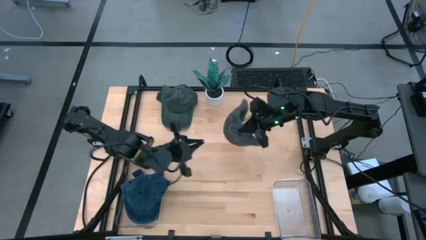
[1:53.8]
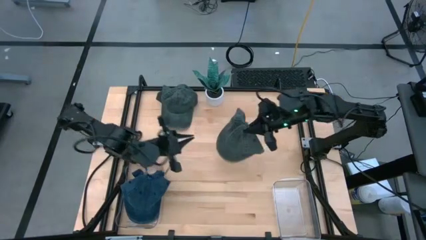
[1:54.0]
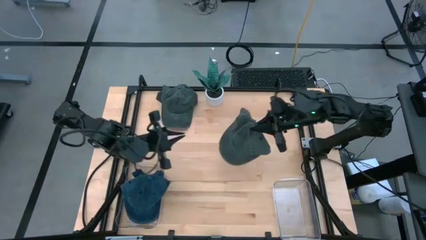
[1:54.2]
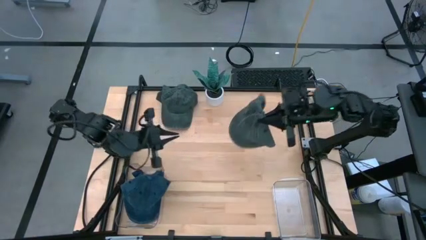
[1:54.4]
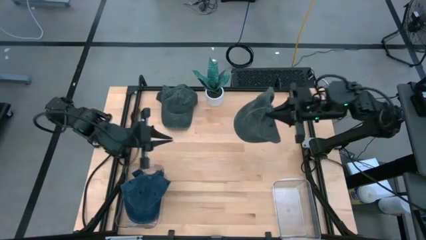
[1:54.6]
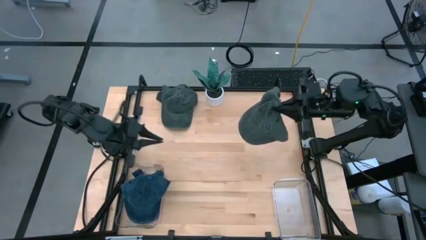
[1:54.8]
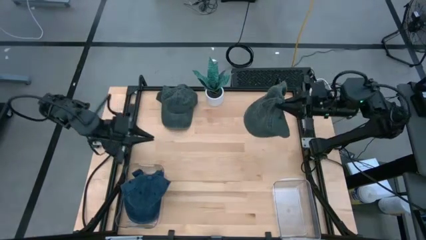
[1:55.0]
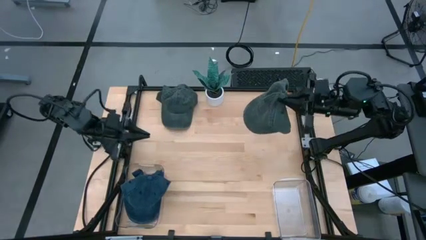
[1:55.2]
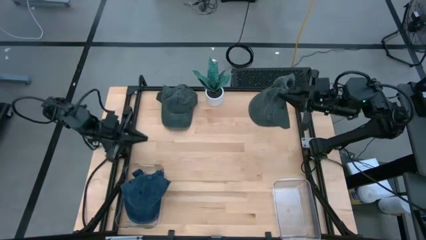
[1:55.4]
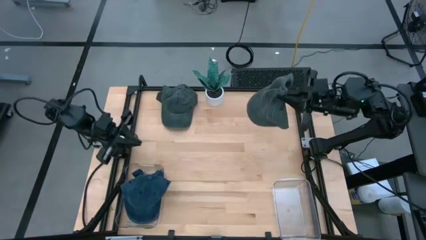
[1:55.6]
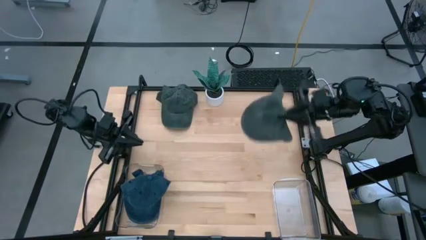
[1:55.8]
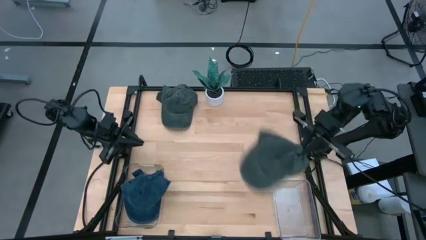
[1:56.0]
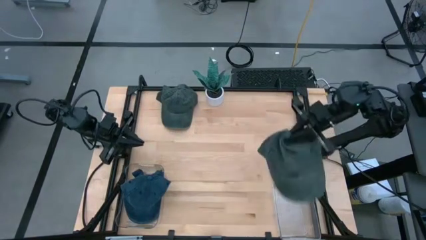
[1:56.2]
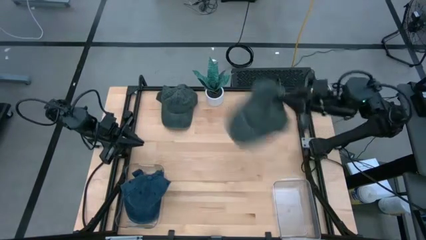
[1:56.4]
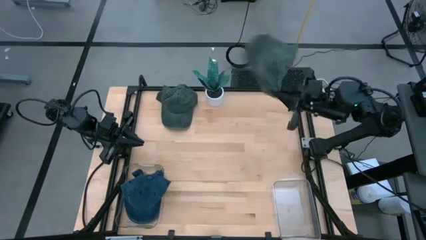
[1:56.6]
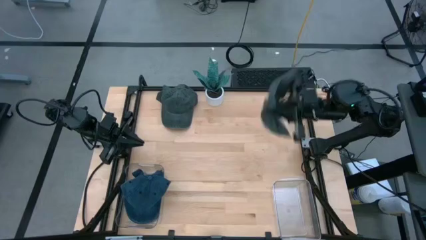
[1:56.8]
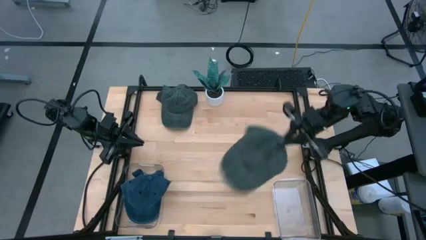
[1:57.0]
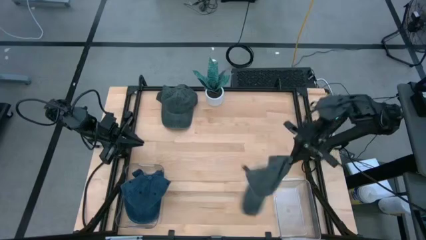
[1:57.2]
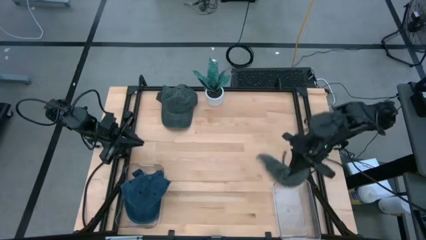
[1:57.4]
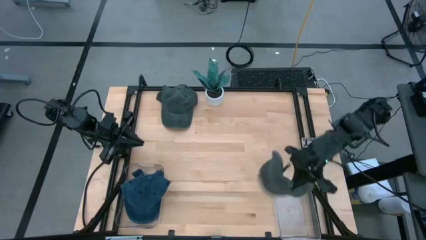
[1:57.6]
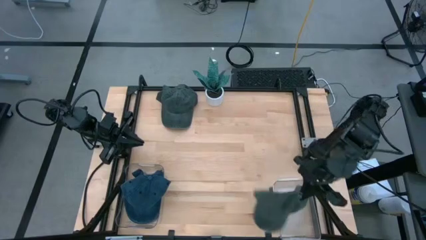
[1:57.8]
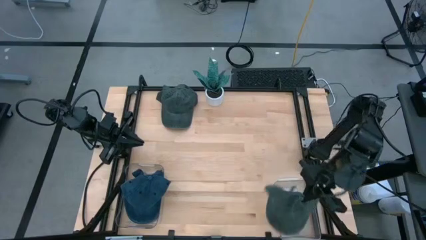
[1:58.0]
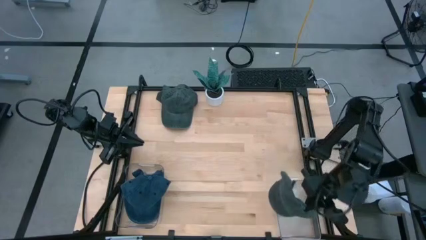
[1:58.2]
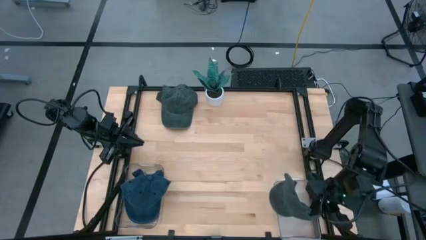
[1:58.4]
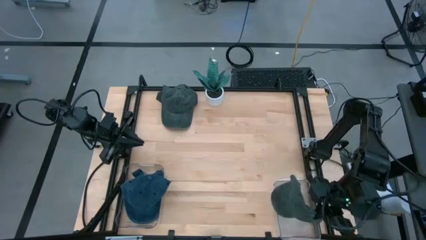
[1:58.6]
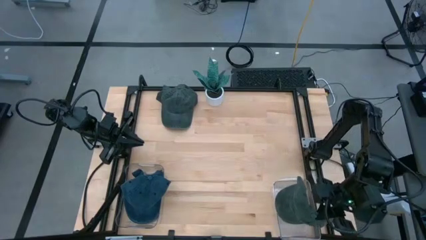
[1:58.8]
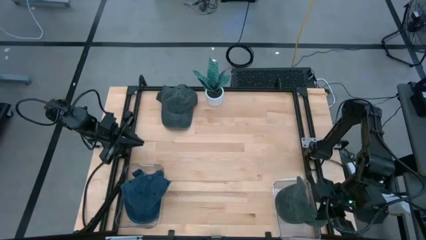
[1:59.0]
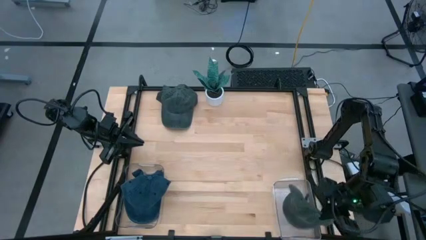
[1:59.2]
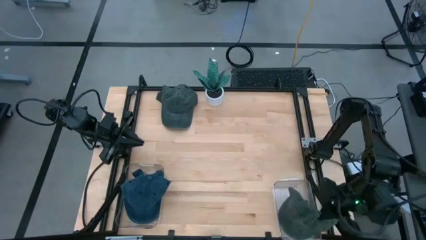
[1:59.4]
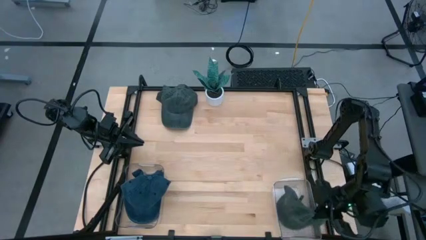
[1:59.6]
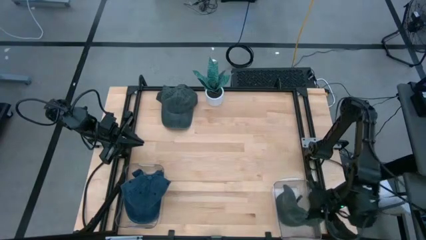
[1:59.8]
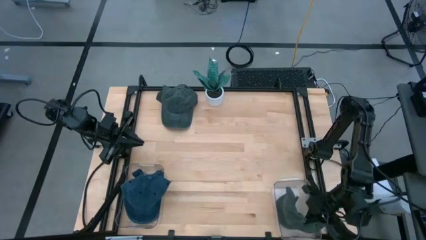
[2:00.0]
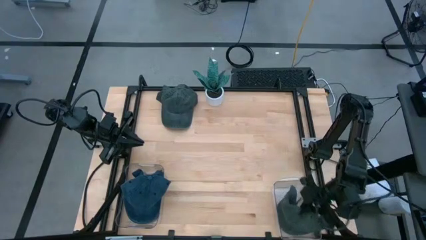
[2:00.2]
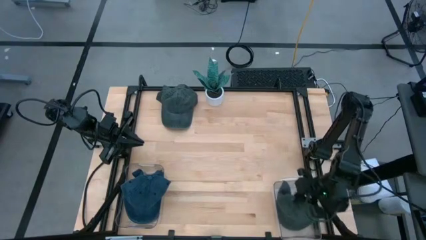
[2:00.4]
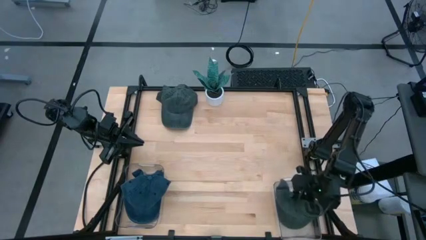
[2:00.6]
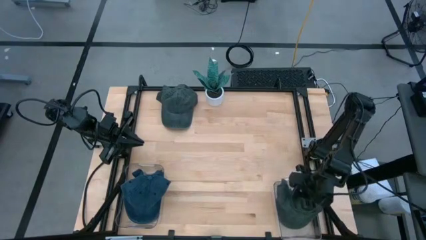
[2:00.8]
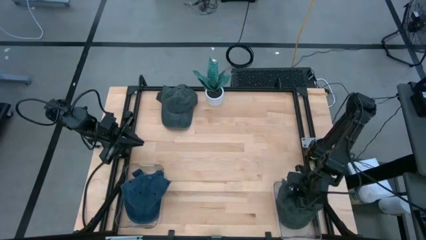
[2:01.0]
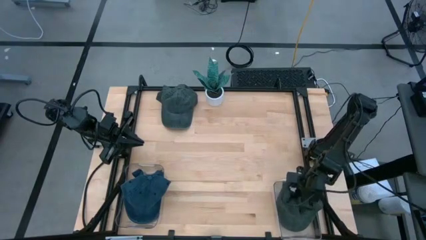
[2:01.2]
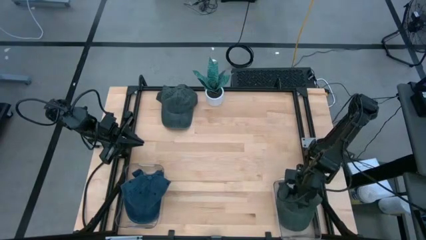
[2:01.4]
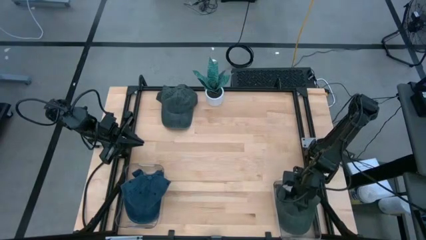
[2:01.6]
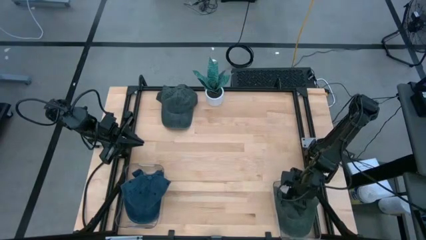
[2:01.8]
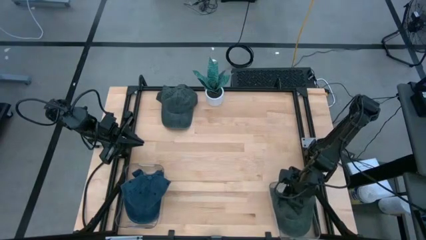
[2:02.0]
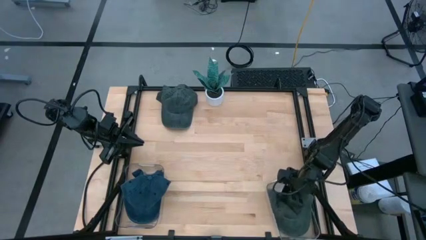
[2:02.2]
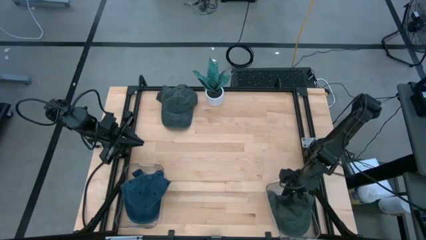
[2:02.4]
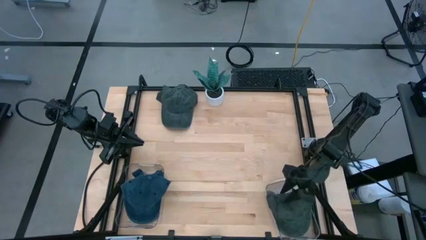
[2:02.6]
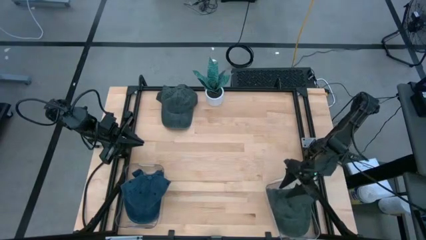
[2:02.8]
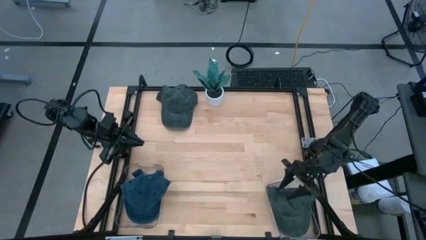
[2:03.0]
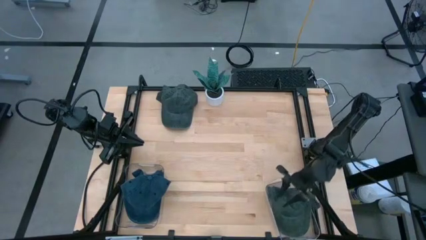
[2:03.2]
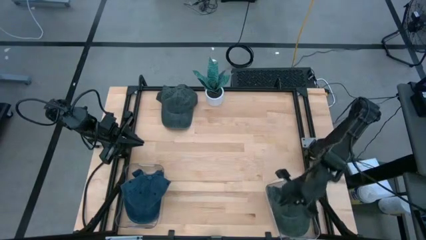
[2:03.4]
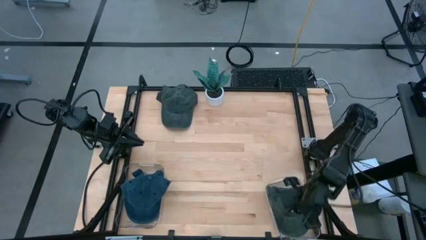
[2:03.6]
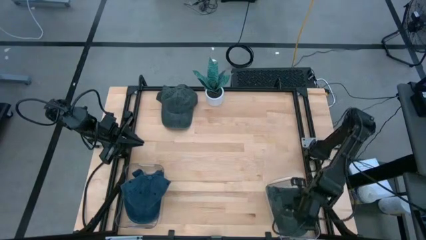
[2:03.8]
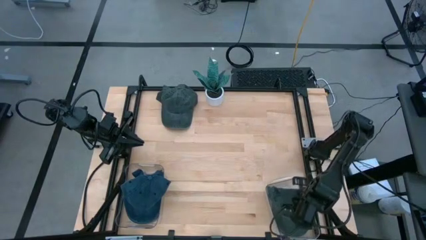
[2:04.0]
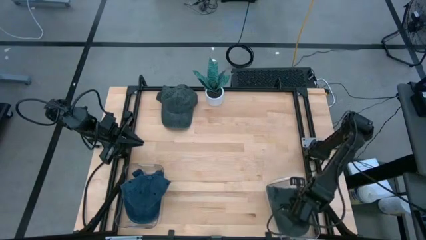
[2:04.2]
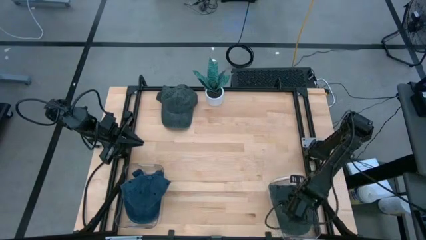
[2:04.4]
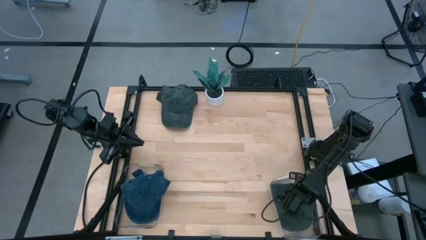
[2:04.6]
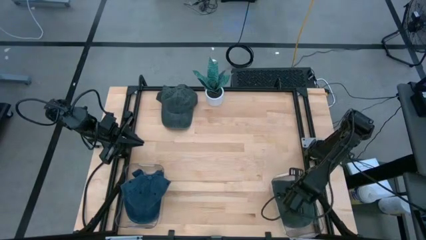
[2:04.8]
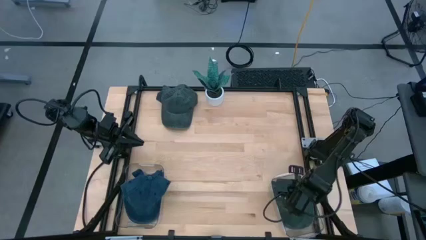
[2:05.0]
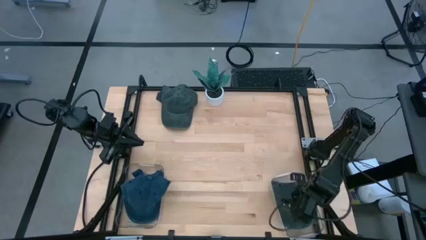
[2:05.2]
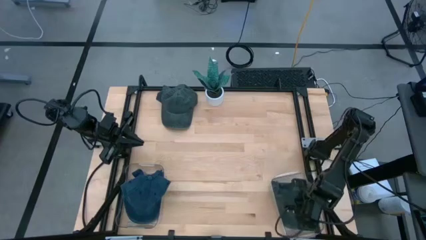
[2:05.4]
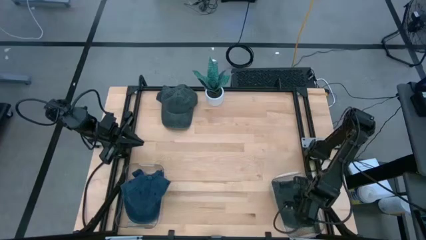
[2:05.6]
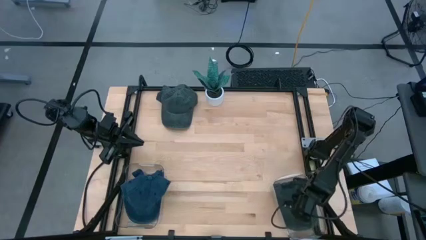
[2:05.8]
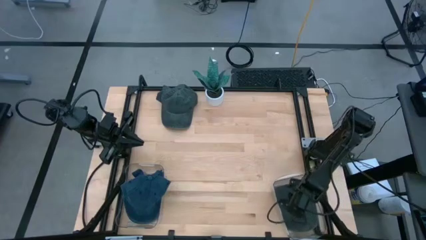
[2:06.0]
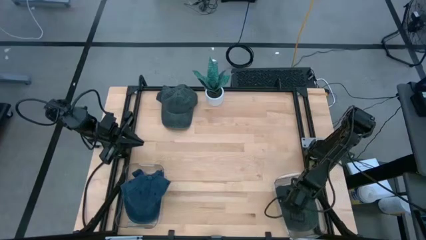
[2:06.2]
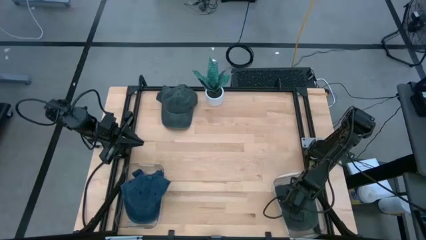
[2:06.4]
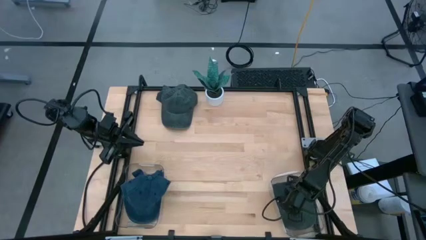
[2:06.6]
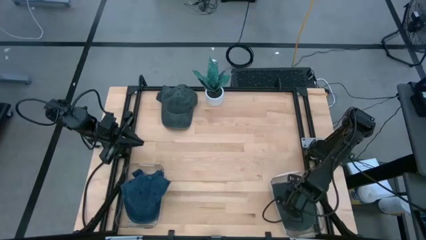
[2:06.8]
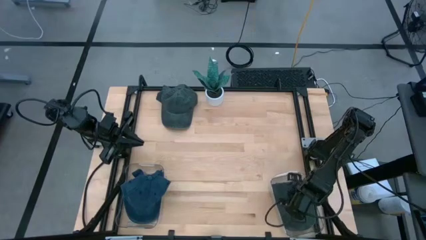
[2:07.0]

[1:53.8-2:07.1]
Task: Pick & Place hat
Put the bottom gray cap into the right transparent bin

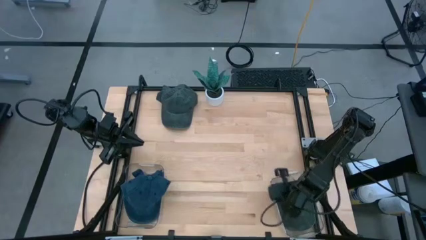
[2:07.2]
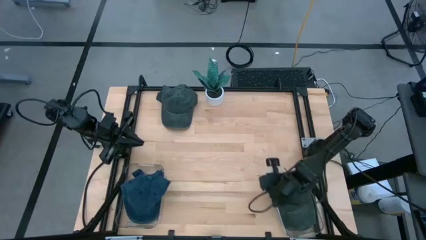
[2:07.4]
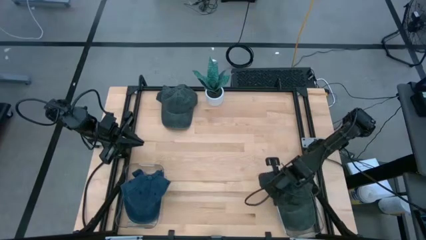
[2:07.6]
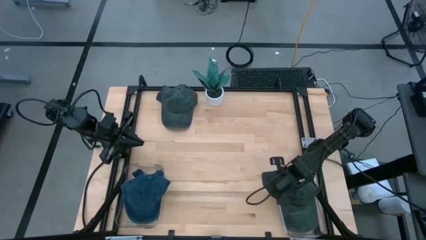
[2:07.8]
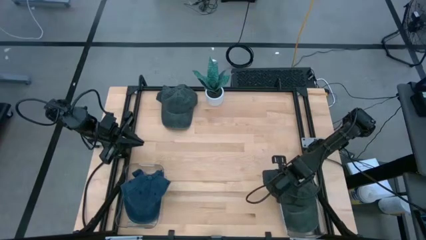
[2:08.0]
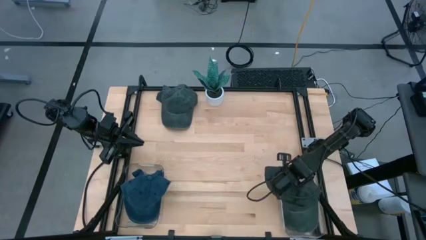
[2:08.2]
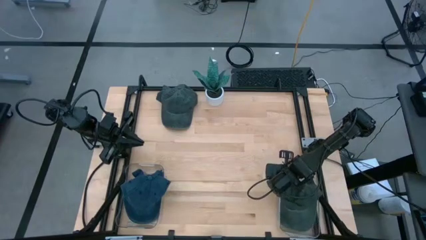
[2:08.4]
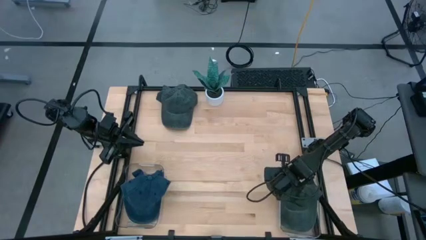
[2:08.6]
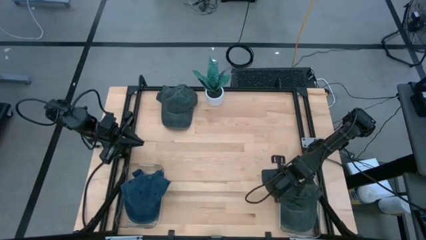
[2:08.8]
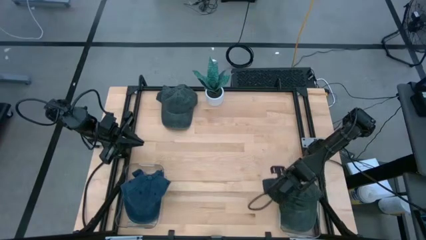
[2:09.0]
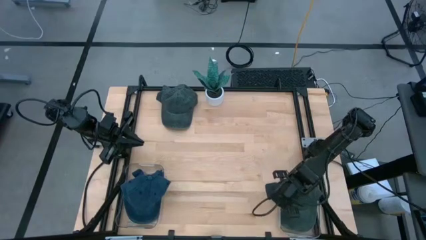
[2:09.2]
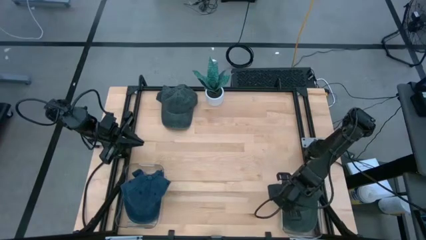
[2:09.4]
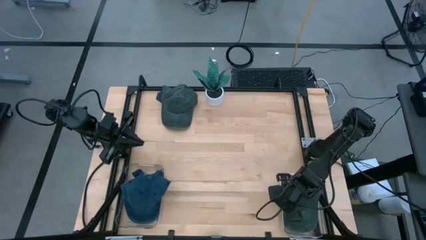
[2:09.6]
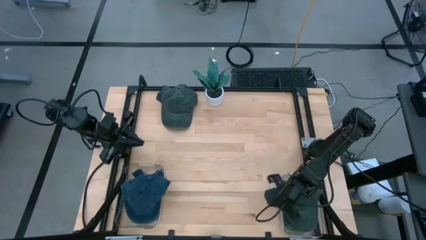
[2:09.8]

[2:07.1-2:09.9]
Adjust the right transparent bin

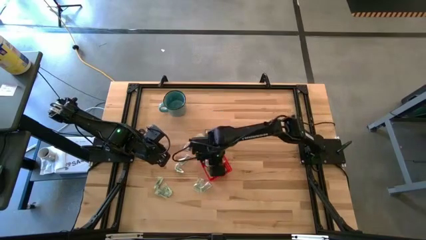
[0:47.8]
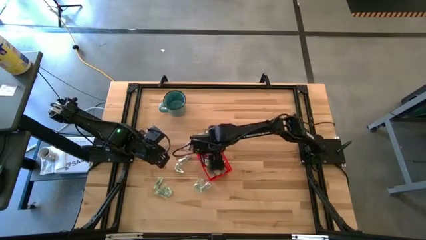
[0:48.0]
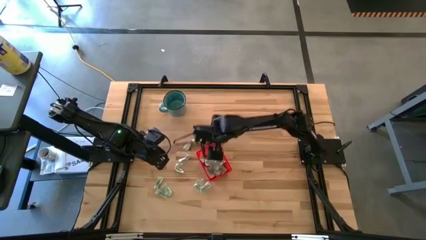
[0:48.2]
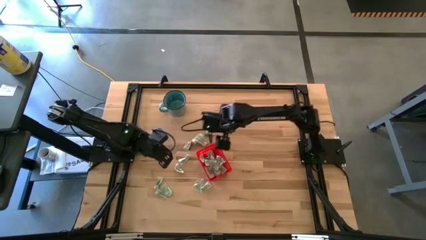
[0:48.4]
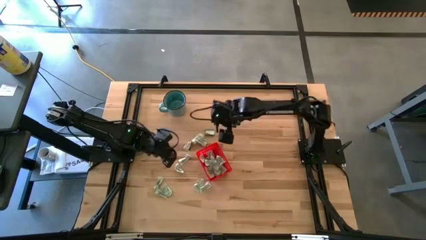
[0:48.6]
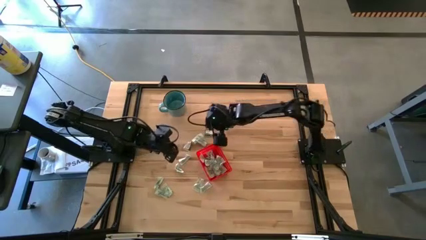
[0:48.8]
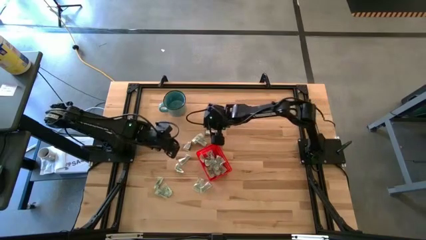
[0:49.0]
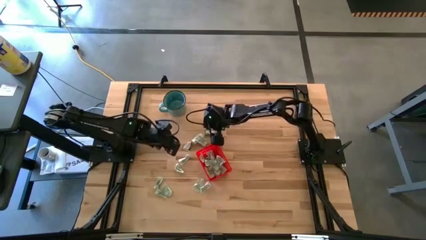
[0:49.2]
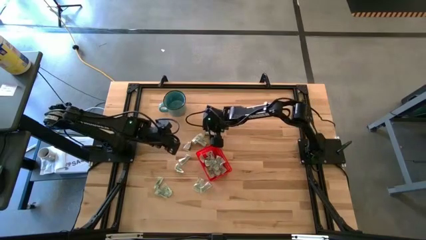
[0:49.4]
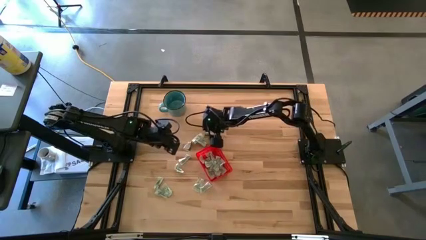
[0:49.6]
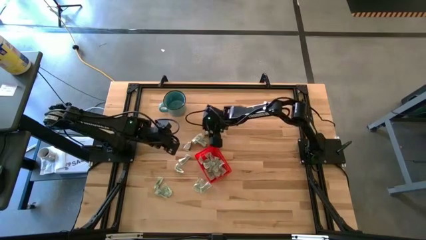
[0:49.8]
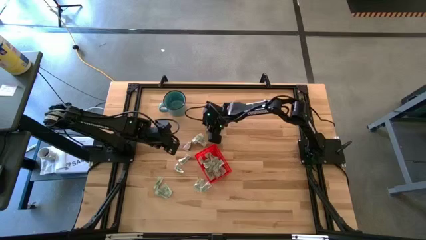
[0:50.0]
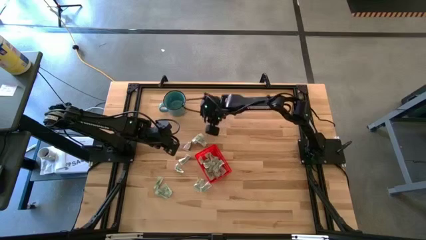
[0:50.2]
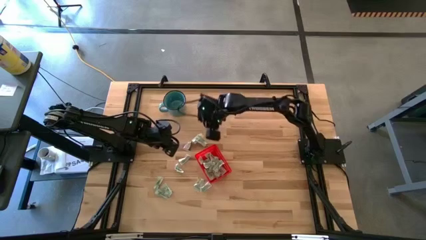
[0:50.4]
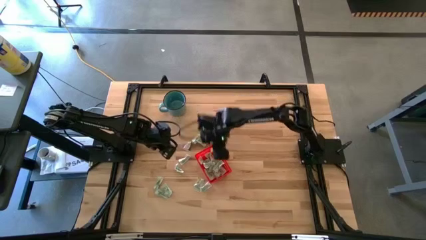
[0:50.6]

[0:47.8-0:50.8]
Task: Pick and place Stevia / Truvia into bins
Put the top green stevia packet into the basket
